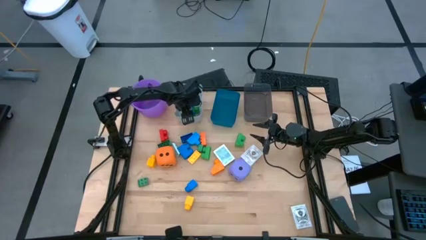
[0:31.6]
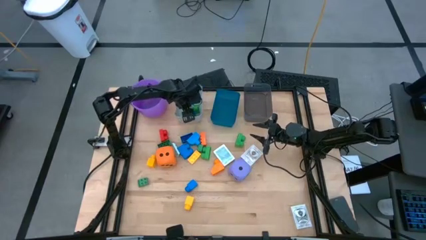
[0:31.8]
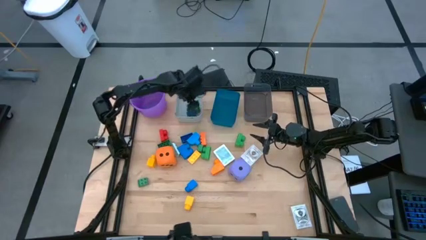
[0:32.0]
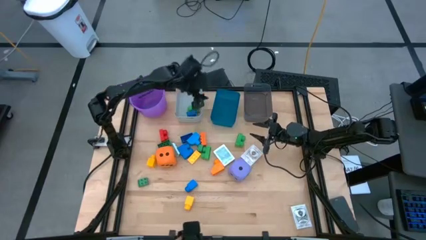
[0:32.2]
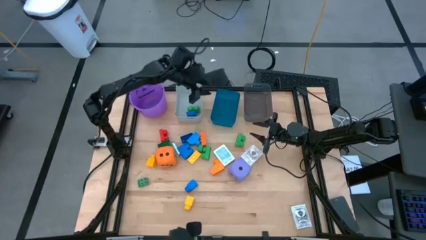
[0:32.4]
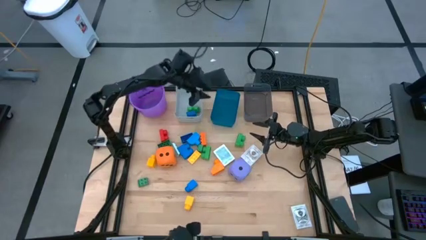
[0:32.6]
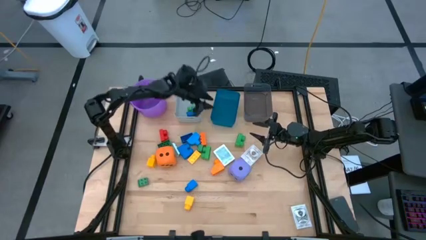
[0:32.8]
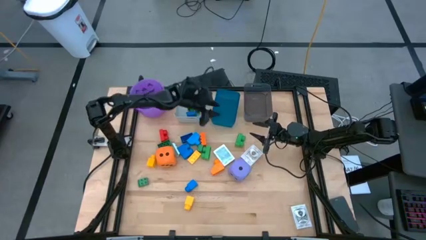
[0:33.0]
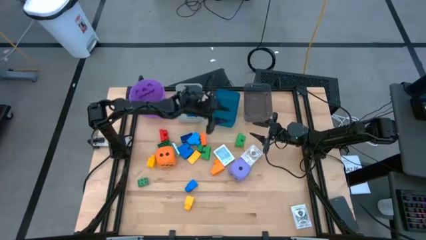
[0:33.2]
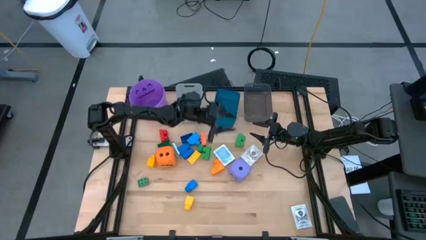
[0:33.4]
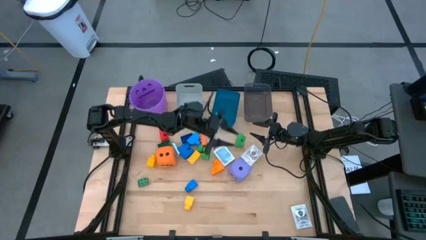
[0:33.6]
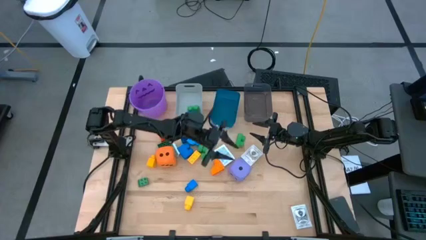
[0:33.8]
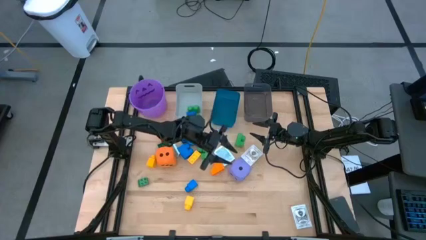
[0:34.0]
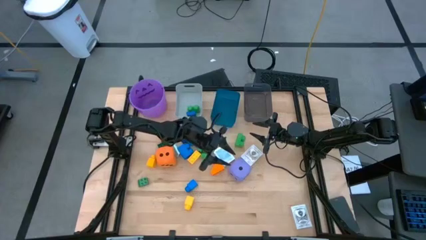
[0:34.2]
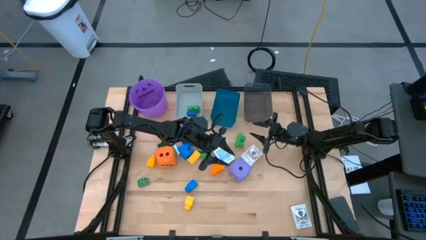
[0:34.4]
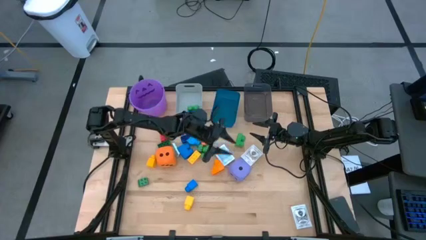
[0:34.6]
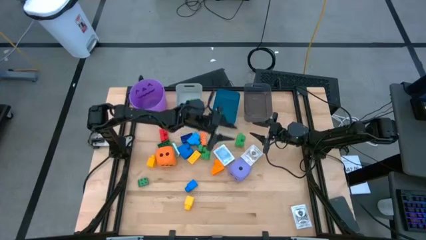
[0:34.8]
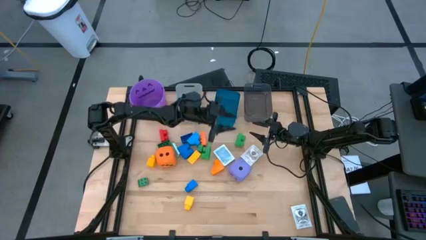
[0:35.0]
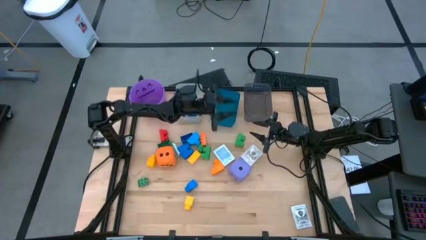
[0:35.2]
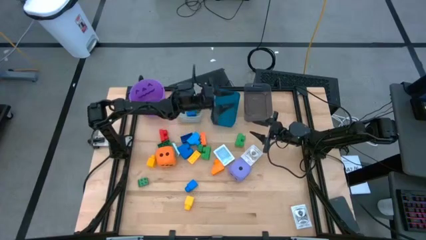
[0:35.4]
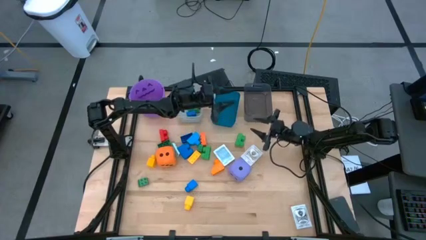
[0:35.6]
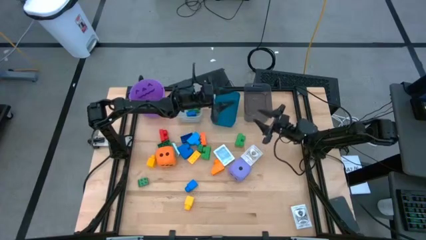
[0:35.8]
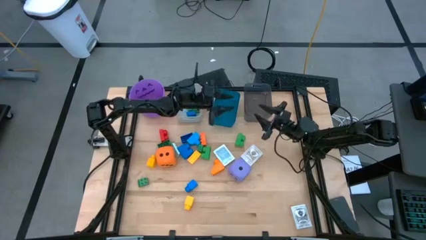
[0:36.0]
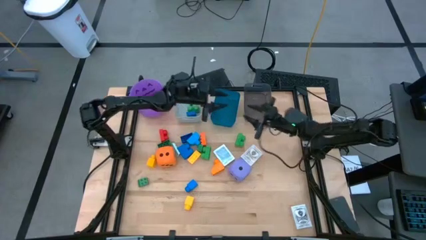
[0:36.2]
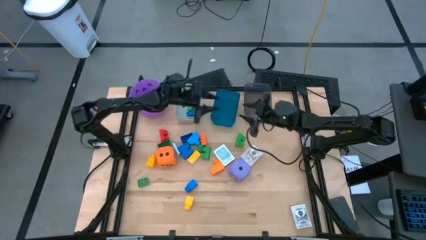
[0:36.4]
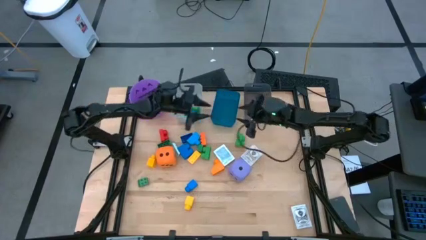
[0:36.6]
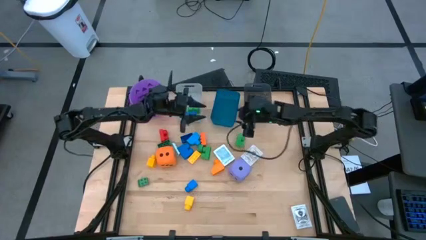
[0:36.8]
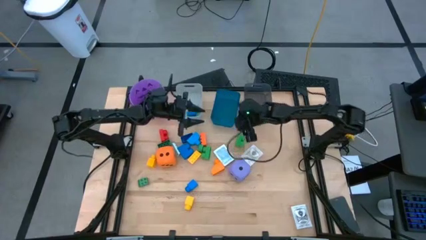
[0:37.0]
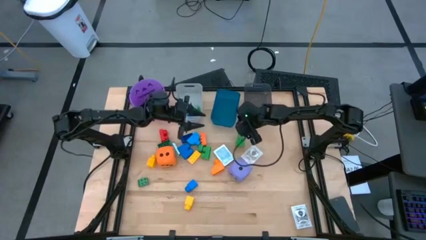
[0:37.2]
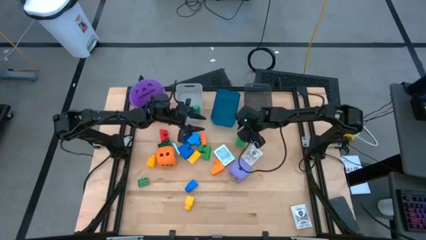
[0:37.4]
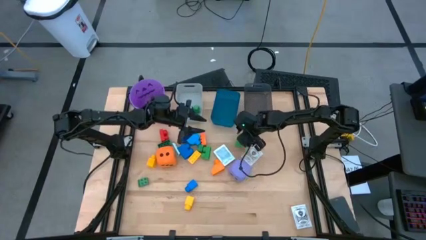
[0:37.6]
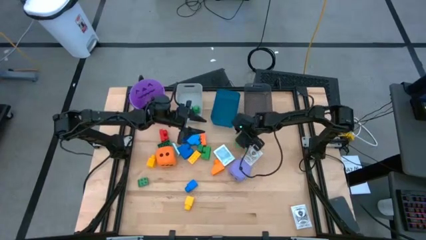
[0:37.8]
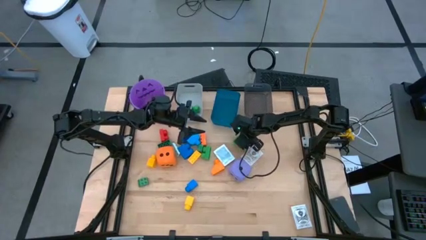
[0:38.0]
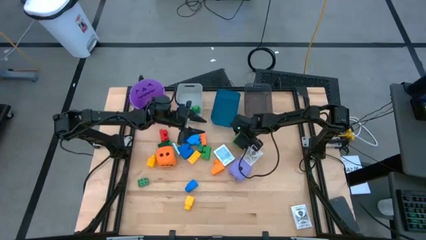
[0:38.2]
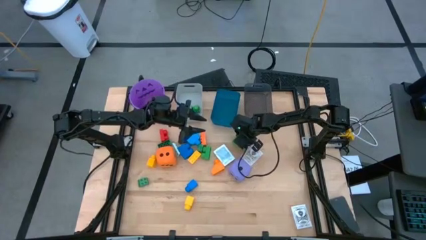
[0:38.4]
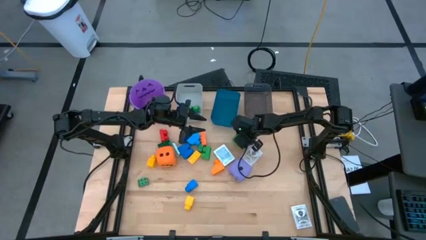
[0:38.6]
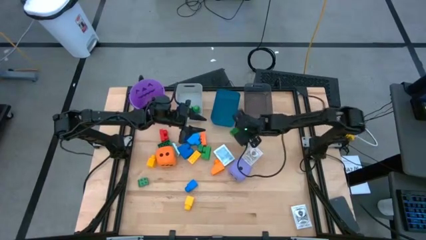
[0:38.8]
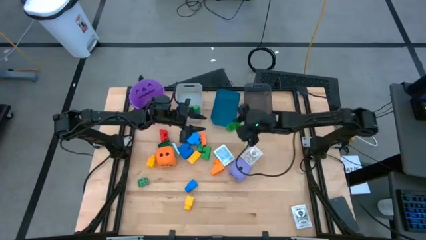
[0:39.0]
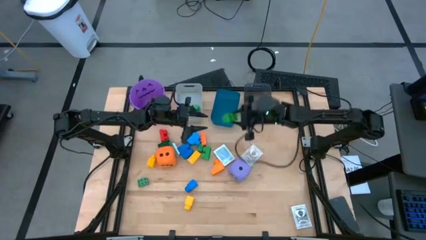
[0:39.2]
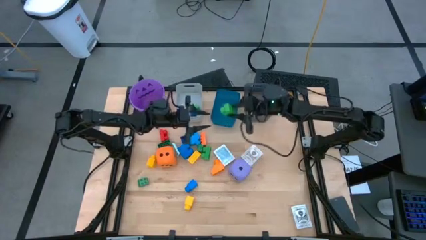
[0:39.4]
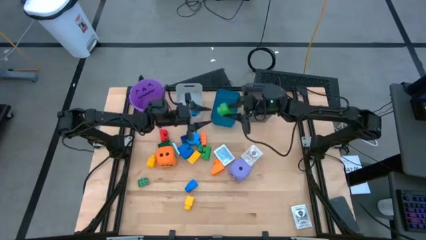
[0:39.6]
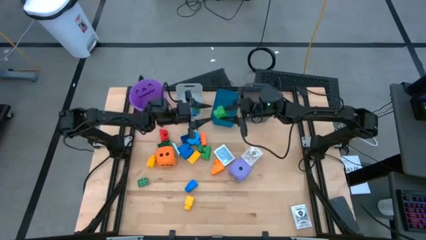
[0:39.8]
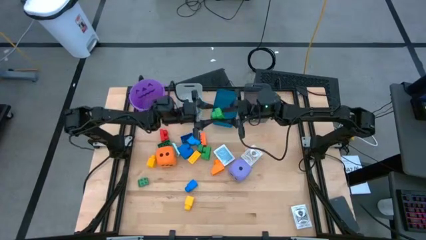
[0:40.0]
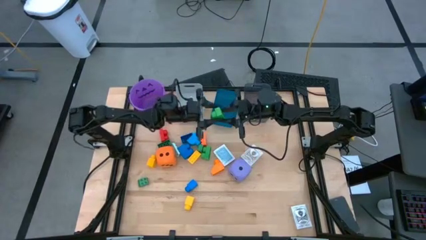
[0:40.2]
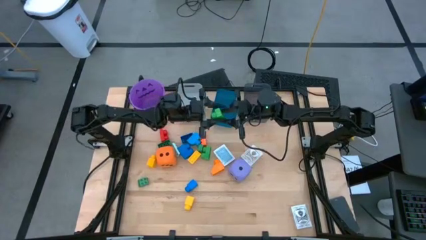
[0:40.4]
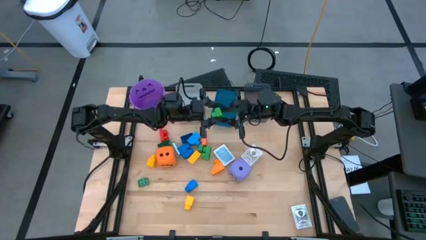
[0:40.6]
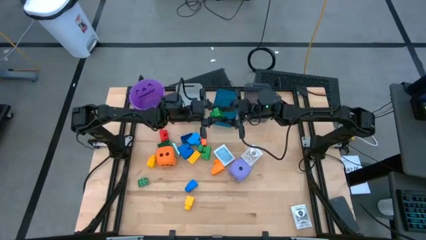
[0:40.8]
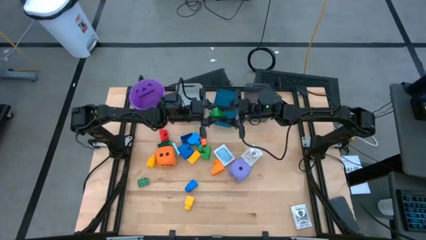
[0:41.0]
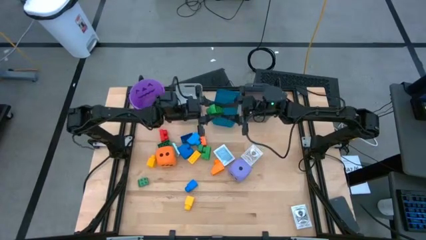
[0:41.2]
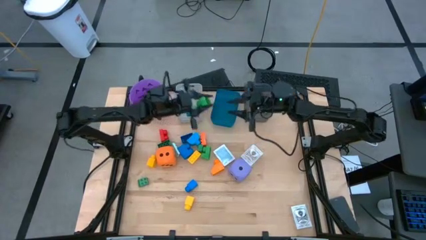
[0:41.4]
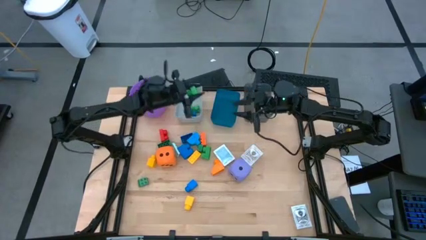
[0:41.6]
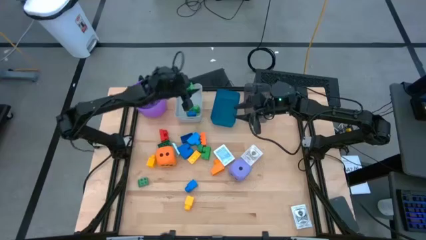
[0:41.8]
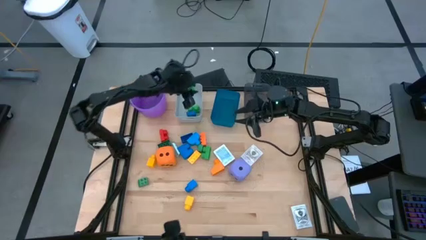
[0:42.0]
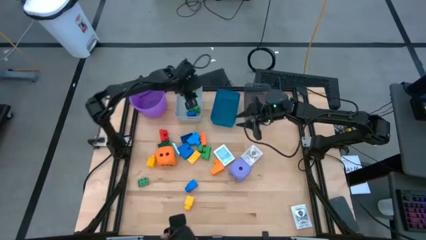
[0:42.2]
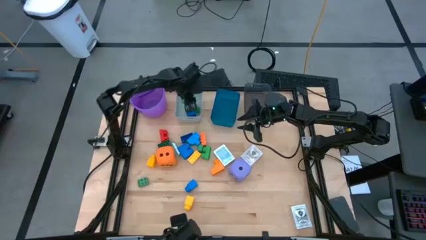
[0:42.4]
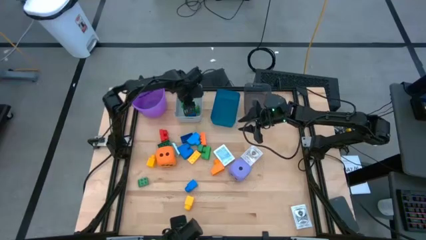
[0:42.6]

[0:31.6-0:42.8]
Task: Pick & Place Toys
Put the green game piece into the gray bin
